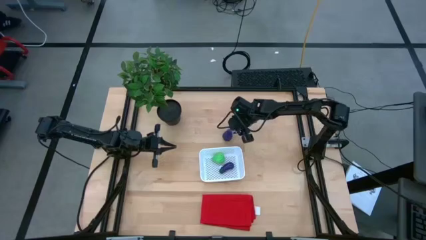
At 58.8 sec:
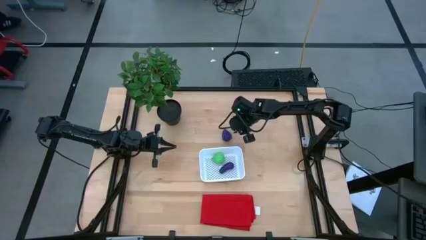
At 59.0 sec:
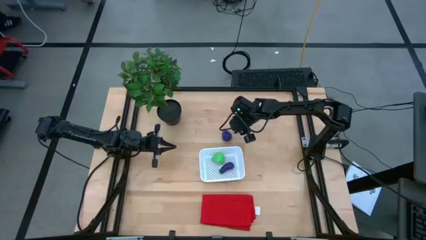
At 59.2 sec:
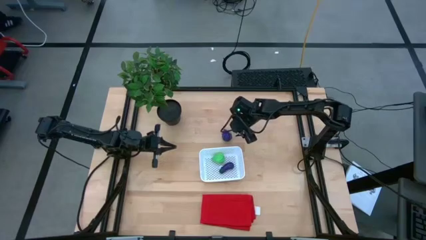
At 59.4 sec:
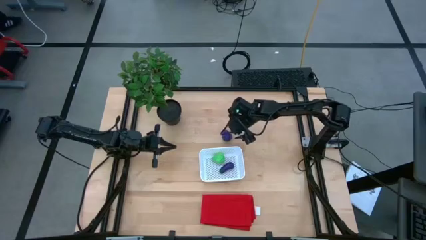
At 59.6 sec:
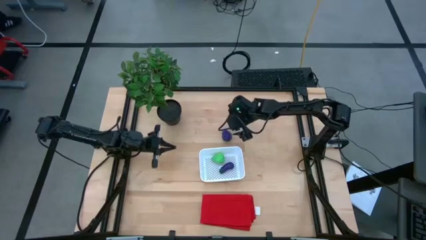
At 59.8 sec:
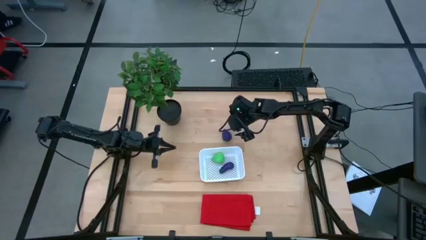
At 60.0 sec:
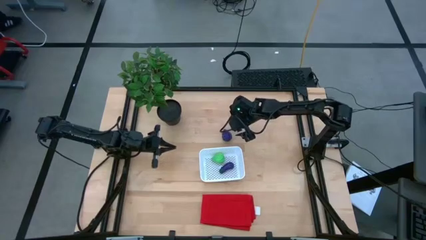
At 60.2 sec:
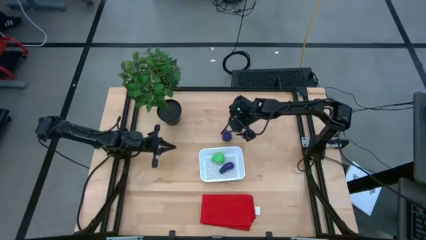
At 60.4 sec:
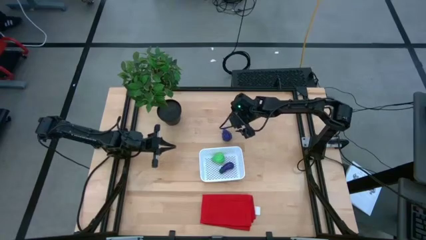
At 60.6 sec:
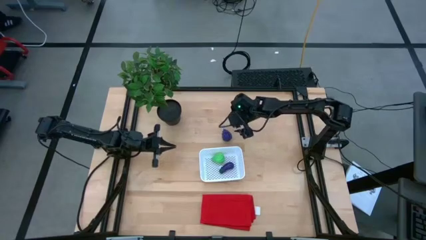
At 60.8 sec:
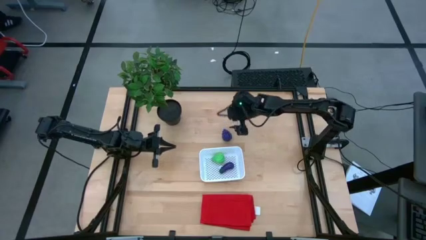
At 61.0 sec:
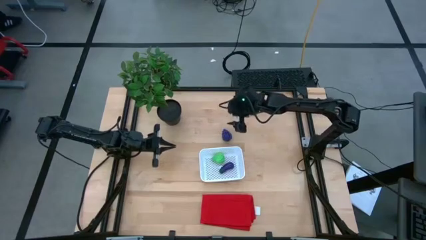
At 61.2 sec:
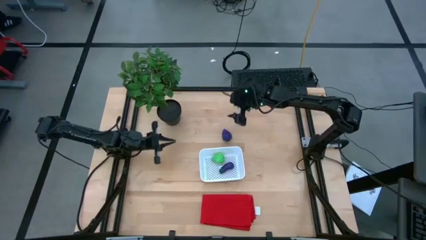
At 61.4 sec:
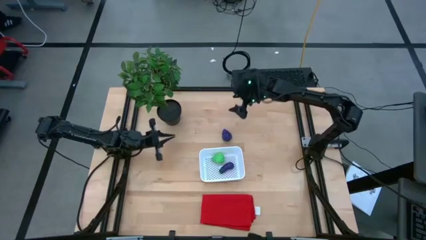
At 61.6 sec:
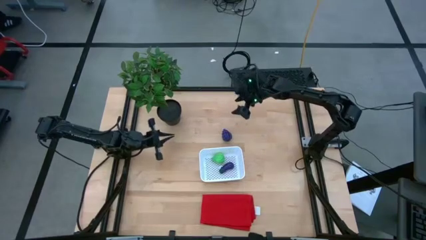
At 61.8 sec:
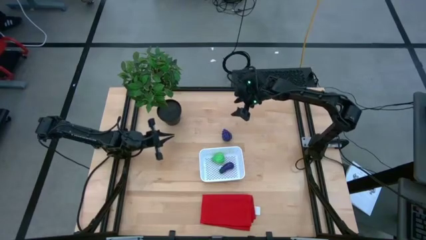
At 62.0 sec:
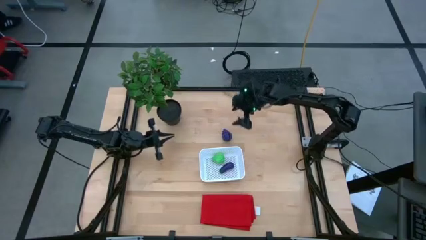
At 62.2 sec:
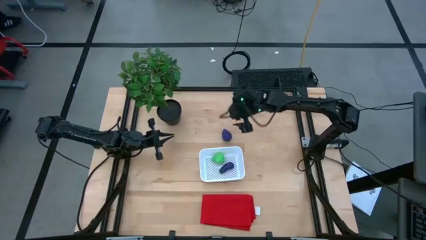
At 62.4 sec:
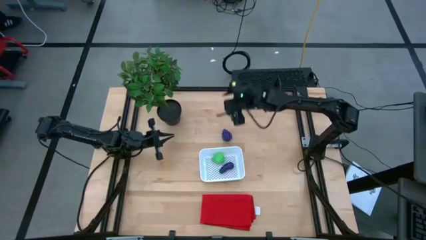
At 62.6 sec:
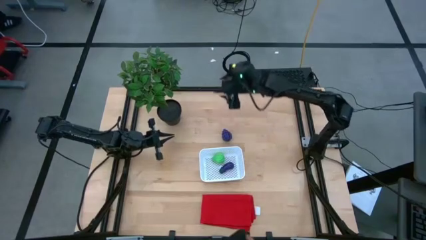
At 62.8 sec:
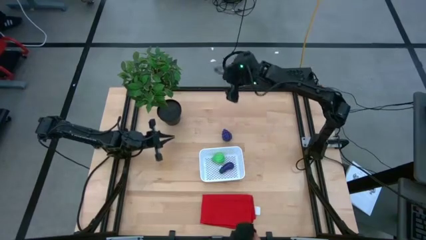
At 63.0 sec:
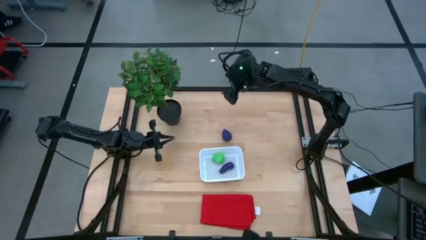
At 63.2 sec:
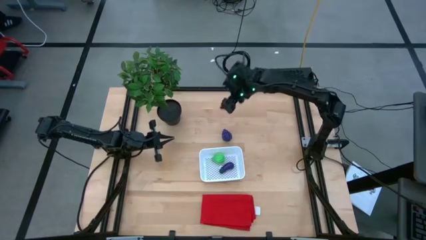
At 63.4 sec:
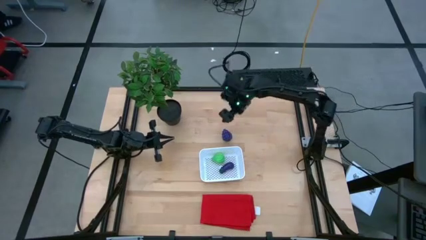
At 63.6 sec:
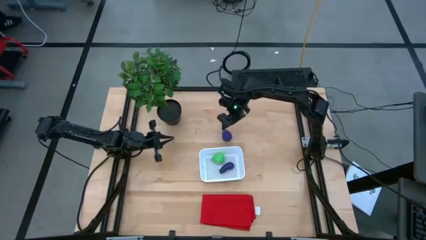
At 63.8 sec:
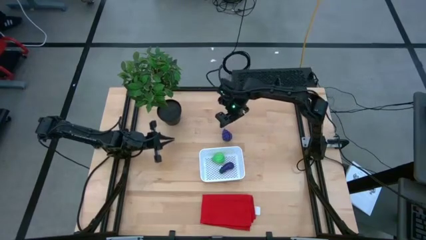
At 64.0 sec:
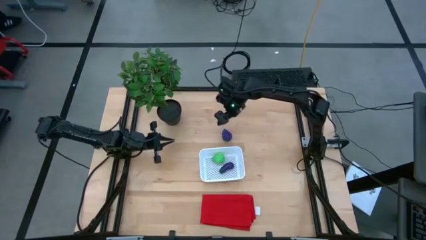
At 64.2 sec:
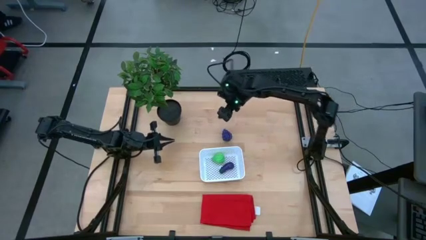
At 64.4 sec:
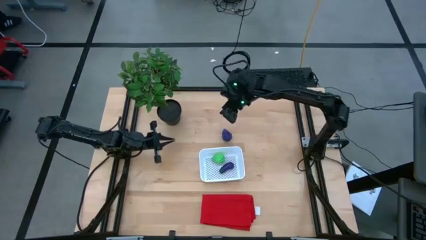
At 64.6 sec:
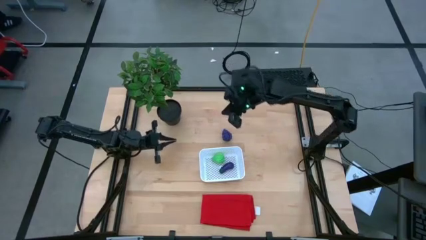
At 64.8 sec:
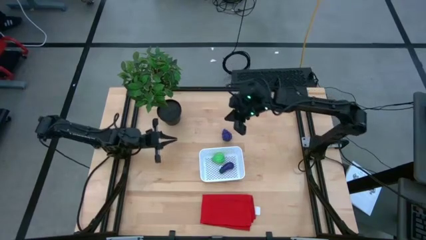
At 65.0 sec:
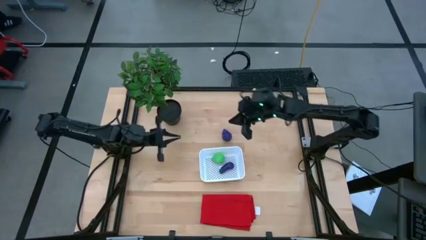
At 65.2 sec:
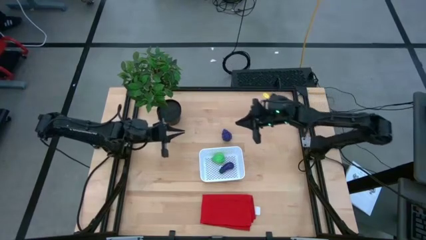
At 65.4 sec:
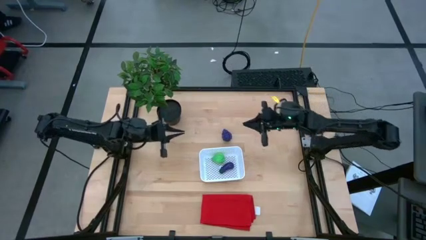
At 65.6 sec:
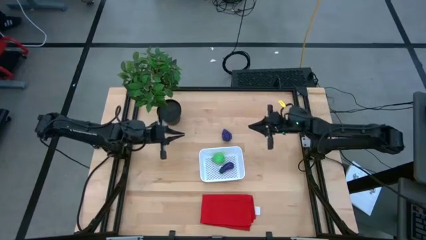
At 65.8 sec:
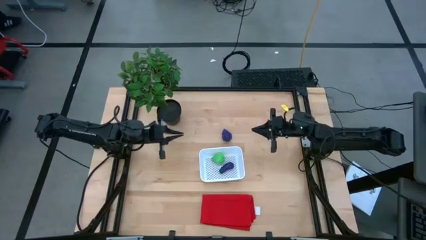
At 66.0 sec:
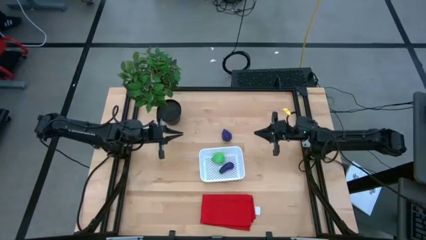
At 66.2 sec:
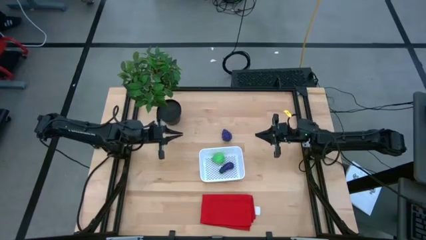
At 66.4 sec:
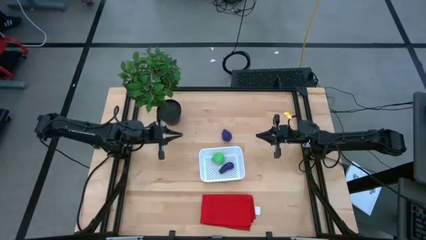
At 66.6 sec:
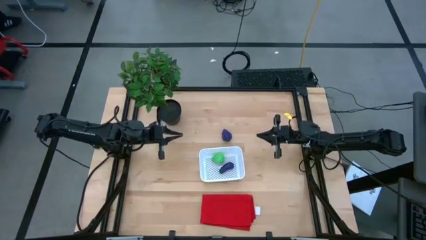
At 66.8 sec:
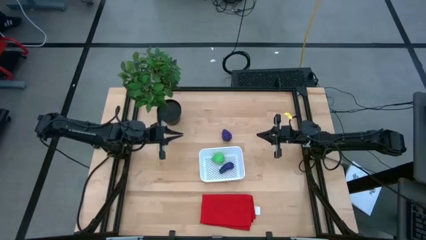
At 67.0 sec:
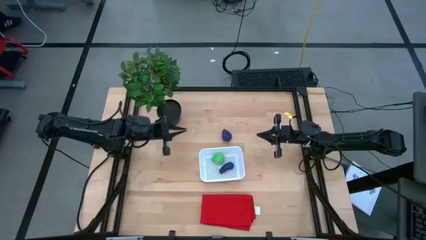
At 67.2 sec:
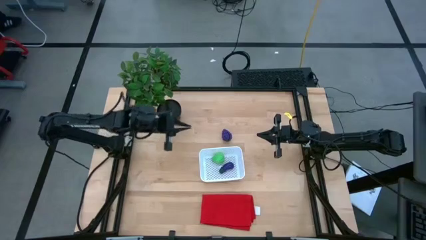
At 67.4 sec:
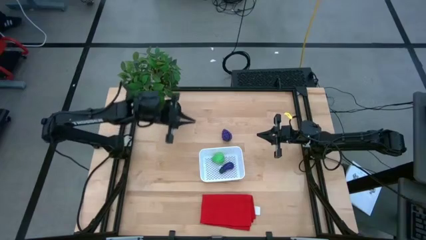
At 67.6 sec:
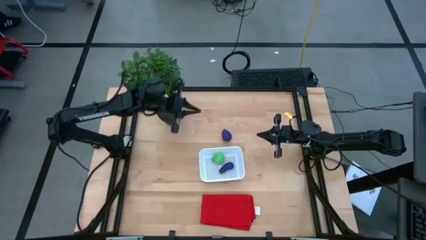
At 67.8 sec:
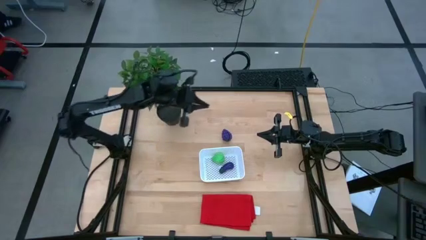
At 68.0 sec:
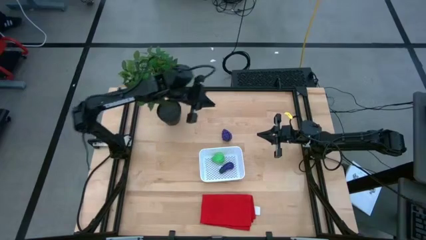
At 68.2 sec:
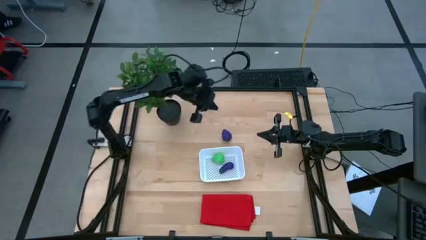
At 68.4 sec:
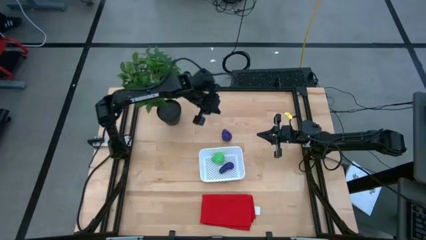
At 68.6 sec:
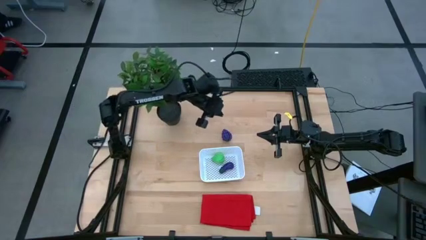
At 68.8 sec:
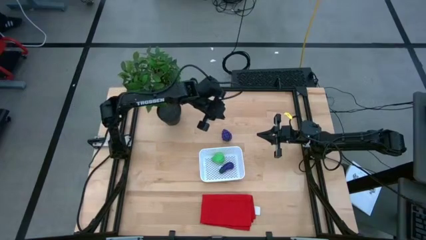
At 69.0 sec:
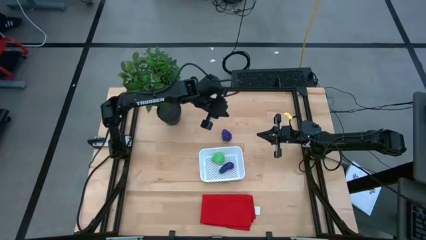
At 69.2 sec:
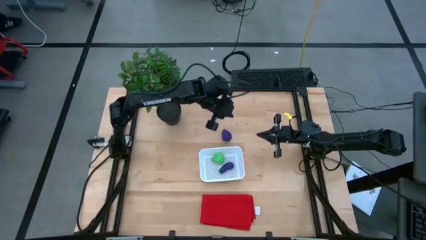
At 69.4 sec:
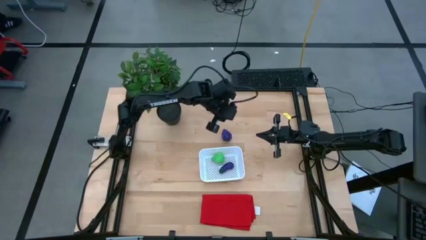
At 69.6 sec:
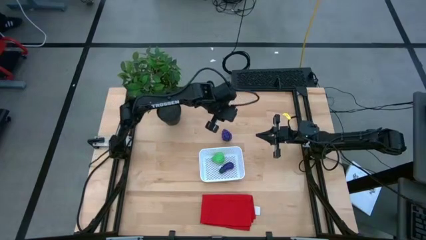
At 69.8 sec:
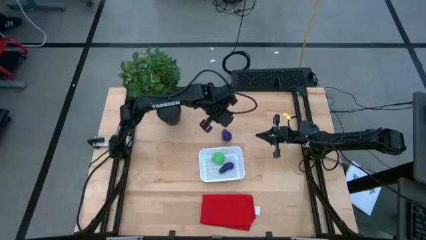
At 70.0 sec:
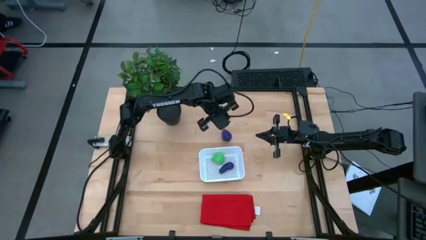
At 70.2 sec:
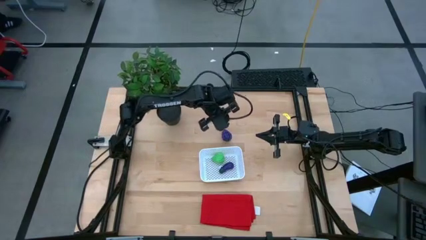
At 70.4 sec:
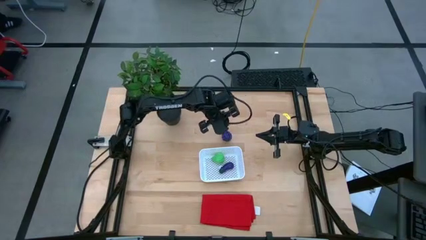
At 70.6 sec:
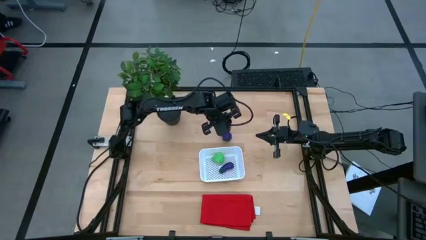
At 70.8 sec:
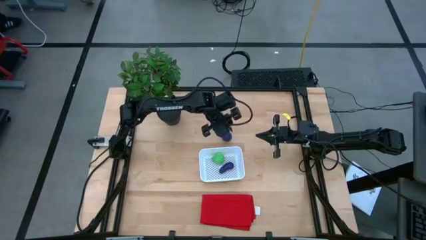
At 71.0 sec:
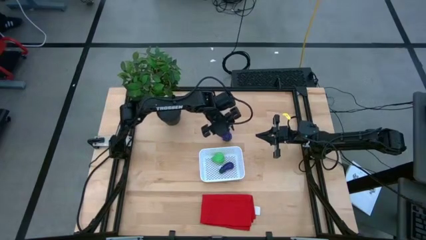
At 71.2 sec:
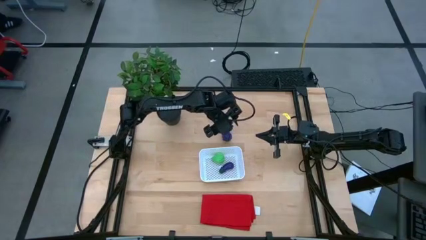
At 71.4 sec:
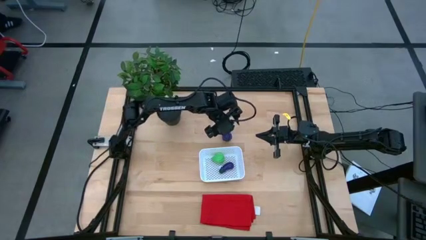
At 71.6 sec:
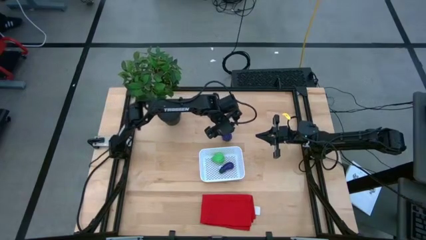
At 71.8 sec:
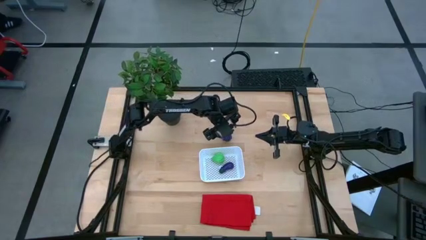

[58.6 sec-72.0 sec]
Task: Pick and placing Produce into tupperware
Put the violet grape into the white bin
